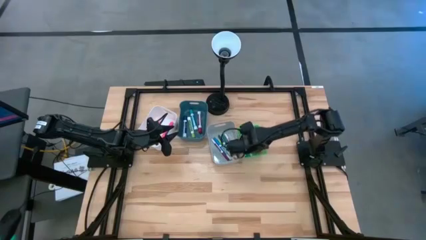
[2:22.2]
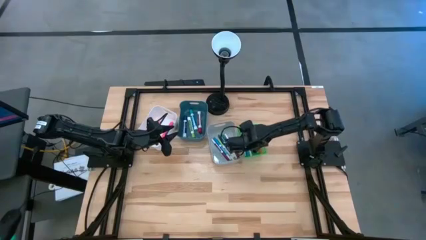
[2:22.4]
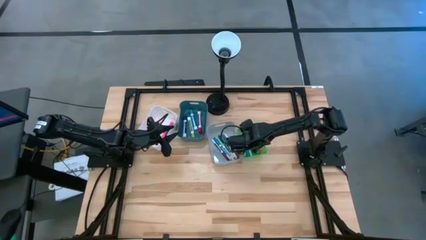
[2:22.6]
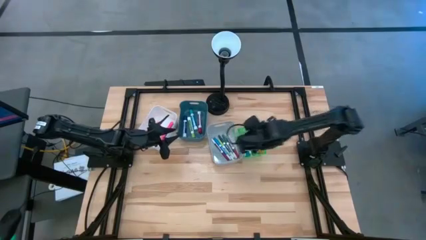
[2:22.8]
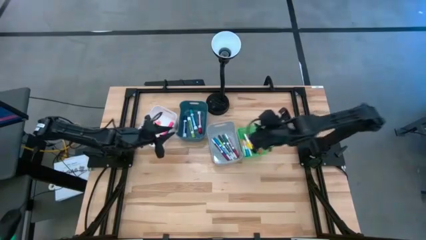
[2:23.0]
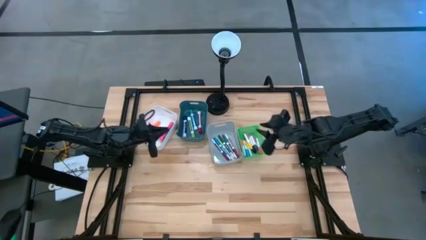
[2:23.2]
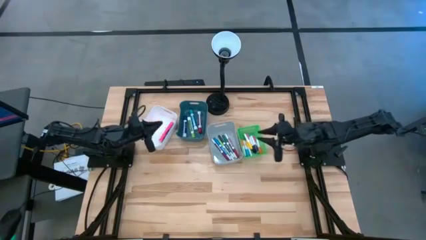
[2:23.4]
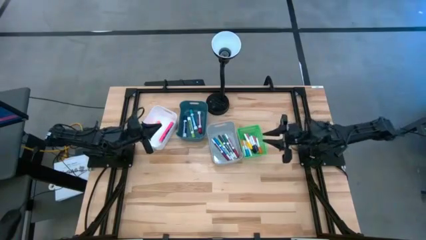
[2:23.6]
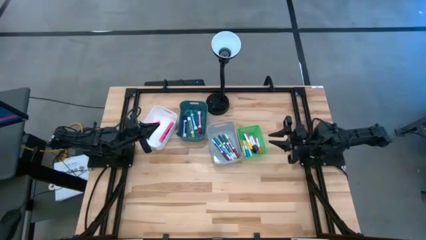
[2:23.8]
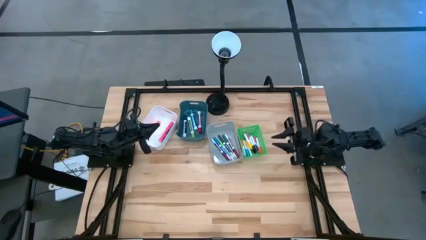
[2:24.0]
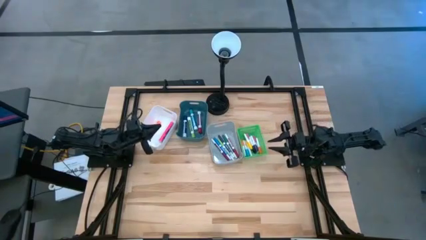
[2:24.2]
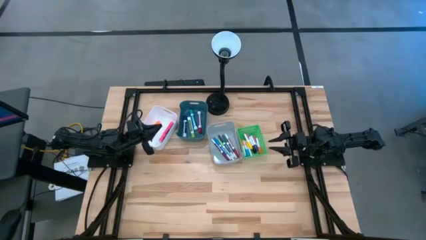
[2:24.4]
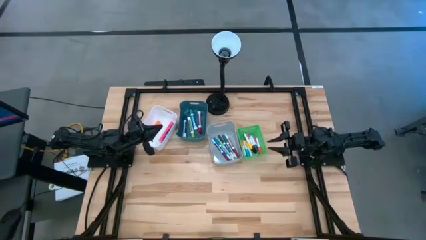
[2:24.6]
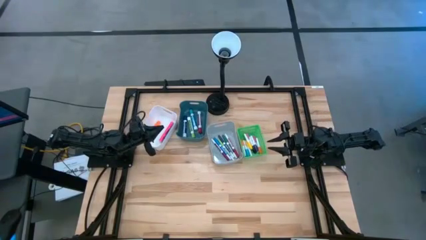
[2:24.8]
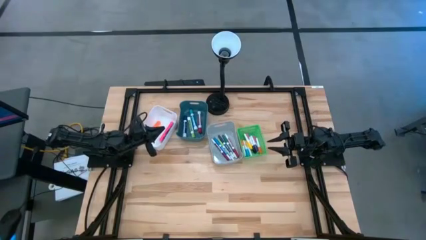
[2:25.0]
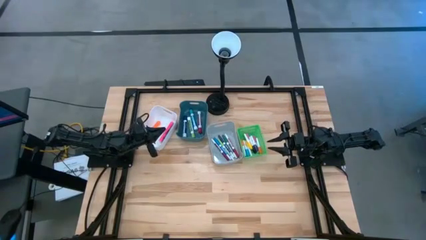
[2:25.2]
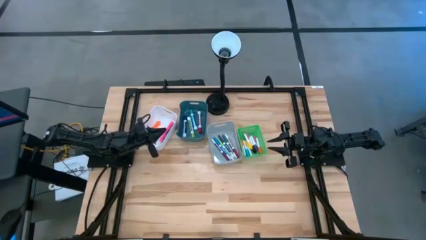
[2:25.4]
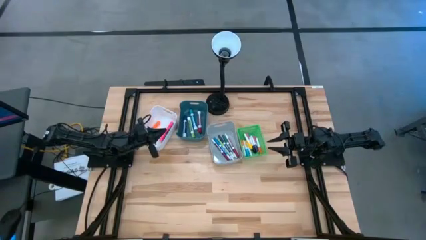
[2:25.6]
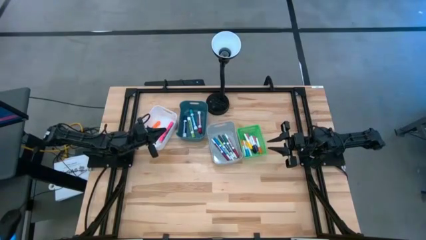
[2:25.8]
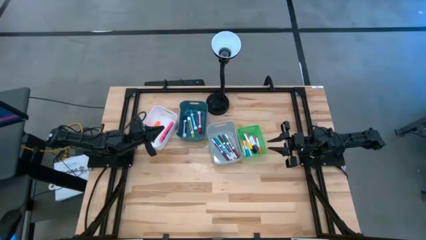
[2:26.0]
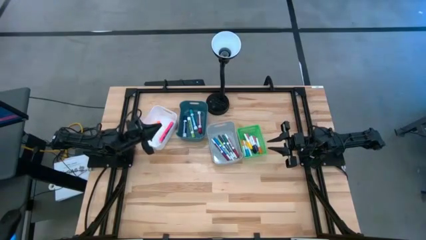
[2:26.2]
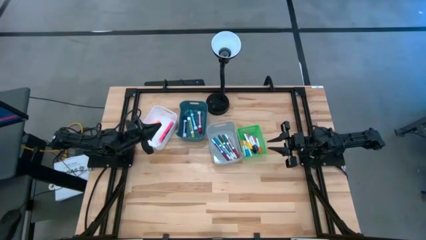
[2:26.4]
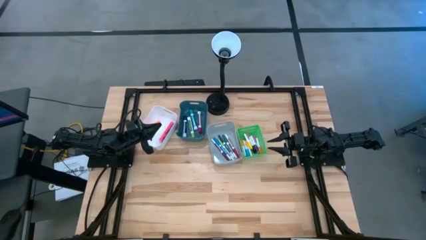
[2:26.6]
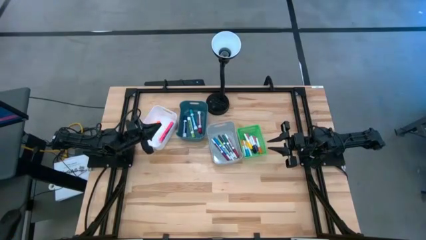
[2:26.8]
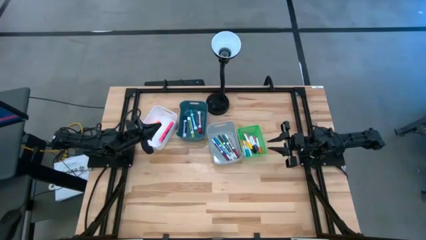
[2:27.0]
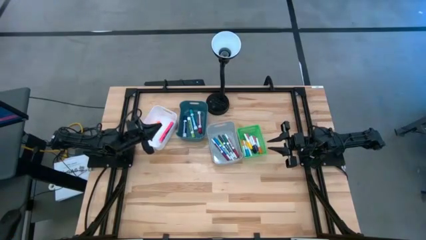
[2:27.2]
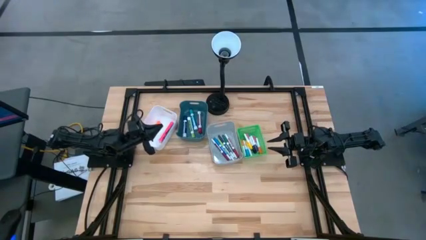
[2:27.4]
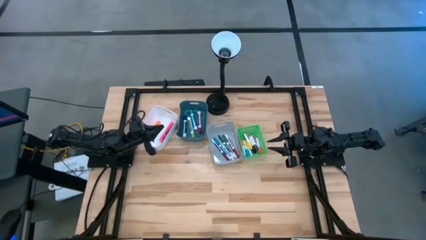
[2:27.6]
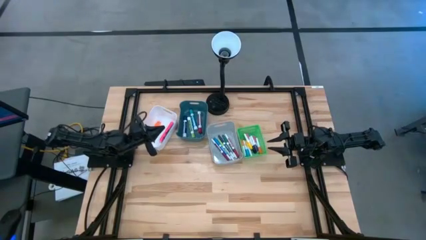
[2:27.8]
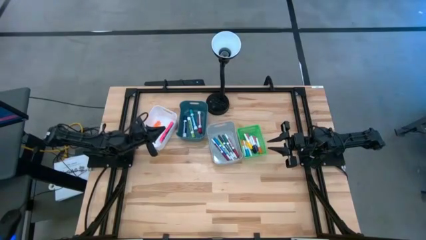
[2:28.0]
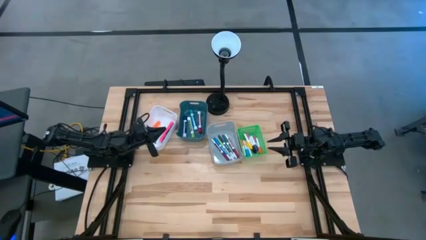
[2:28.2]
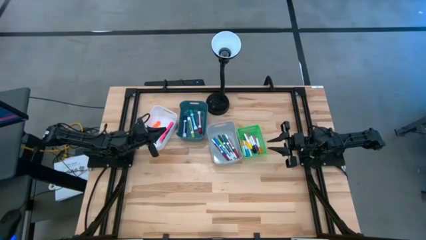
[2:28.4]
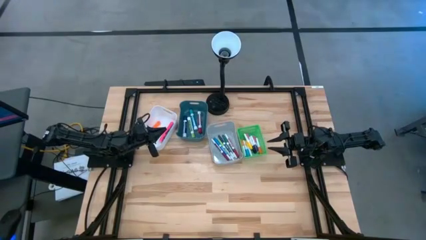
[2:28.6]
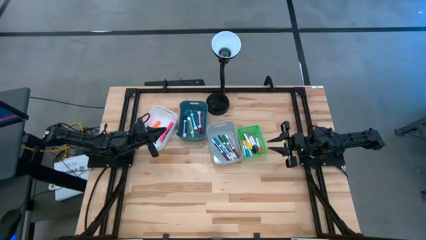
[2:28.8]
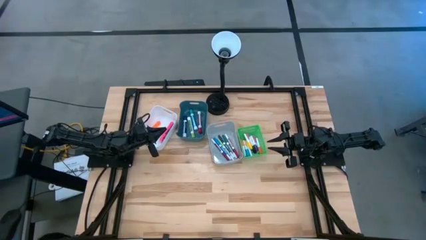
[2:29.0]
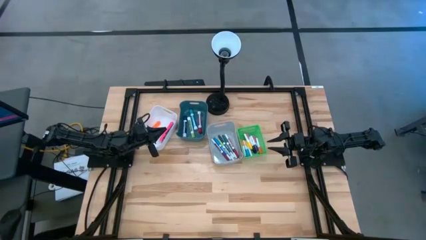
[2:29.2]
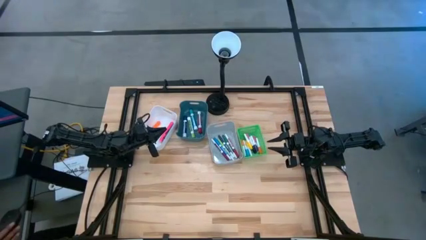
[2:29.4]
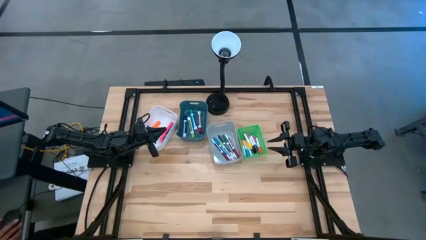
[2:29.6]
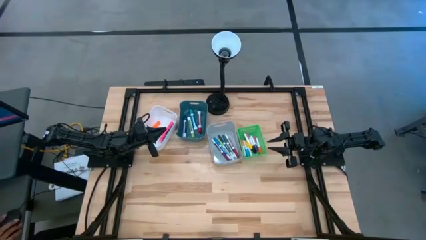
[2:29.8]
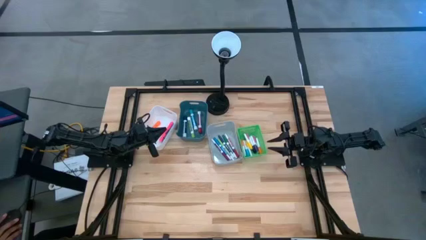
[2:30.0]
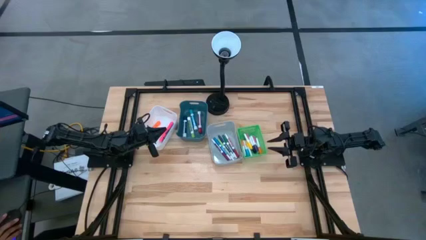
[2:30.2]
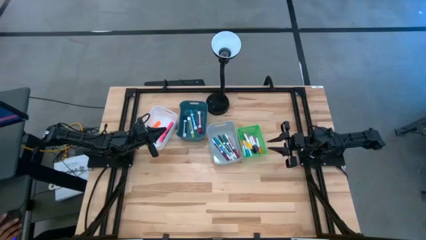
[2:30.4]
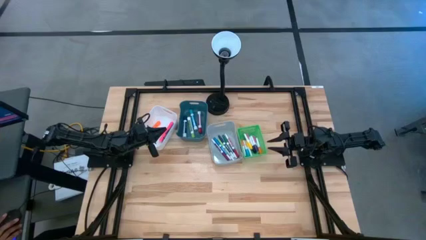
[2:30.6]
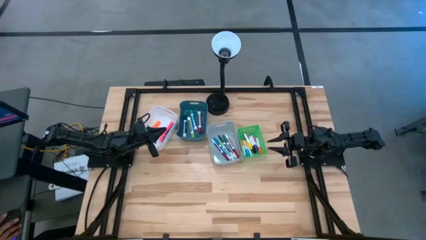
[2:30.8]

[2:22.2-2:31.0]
Task: Pick & Place Markers
Return to Home Position

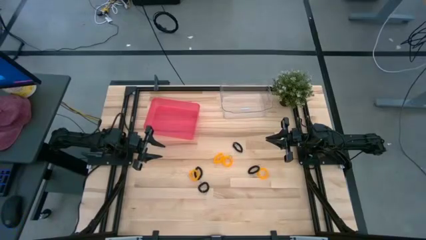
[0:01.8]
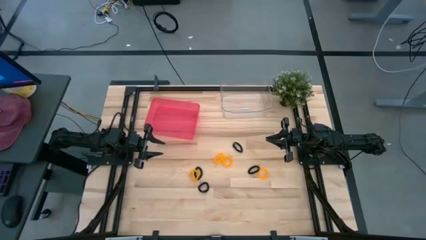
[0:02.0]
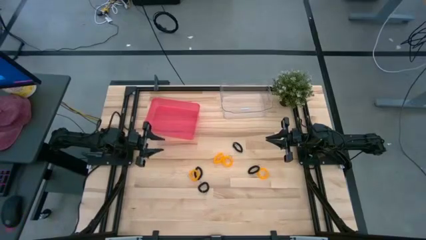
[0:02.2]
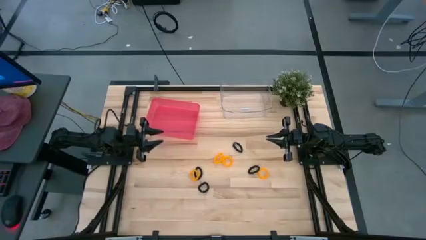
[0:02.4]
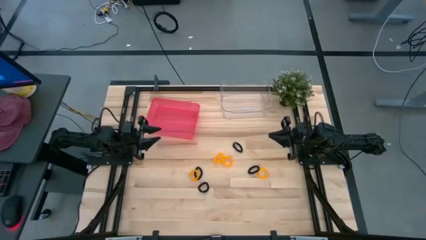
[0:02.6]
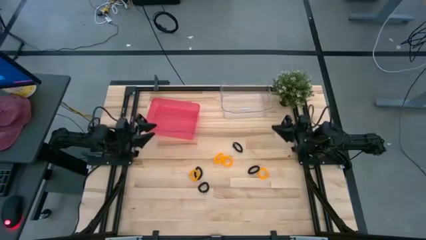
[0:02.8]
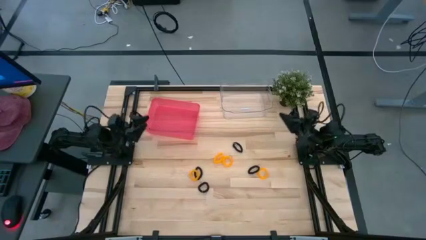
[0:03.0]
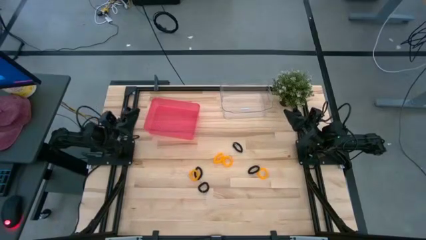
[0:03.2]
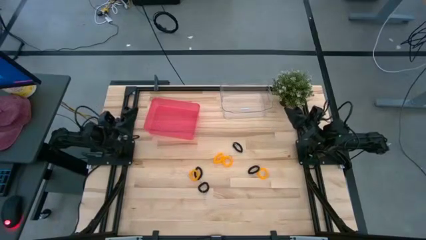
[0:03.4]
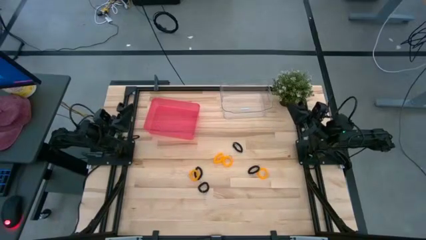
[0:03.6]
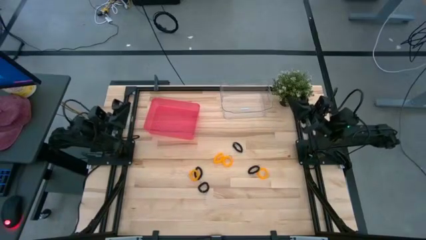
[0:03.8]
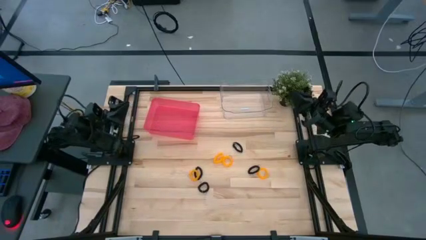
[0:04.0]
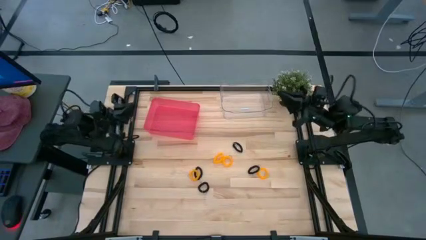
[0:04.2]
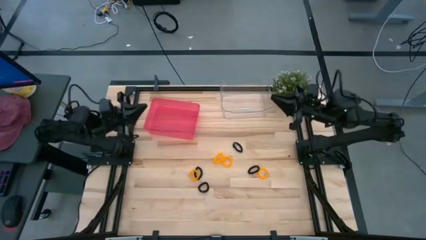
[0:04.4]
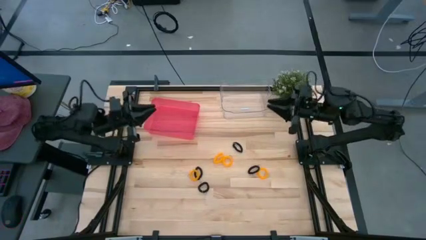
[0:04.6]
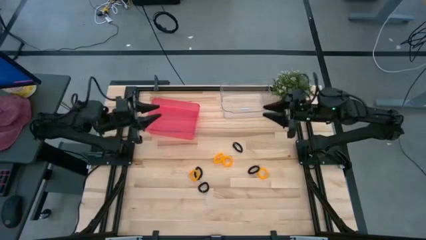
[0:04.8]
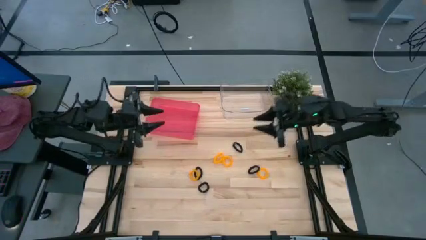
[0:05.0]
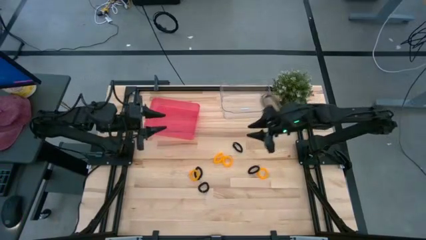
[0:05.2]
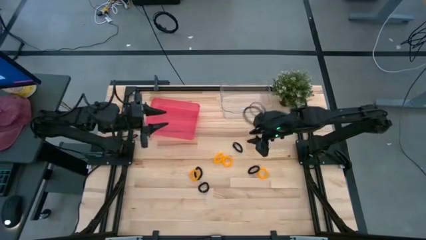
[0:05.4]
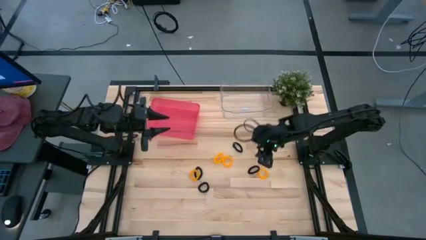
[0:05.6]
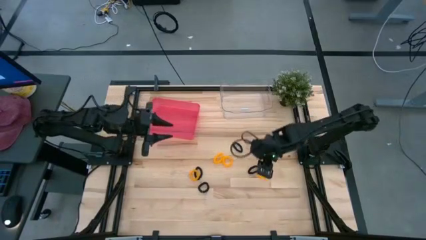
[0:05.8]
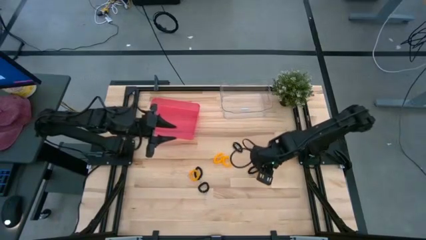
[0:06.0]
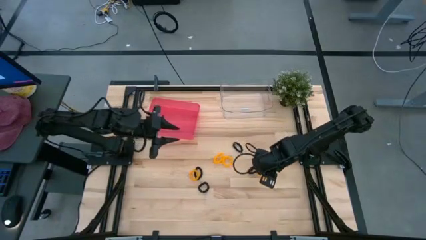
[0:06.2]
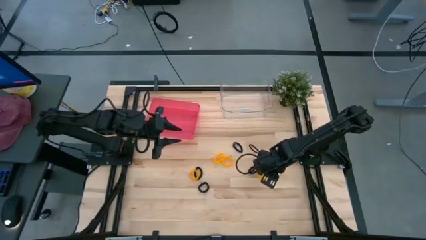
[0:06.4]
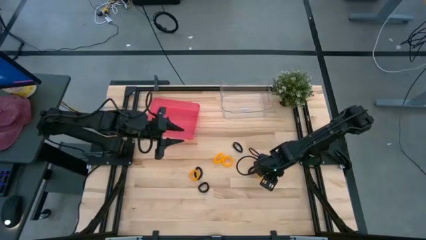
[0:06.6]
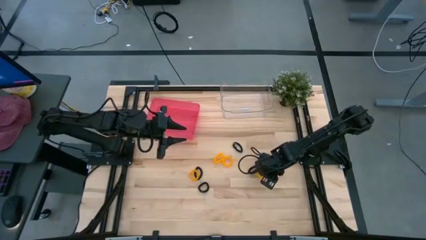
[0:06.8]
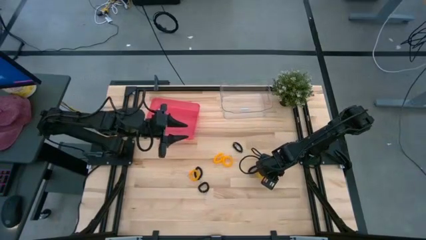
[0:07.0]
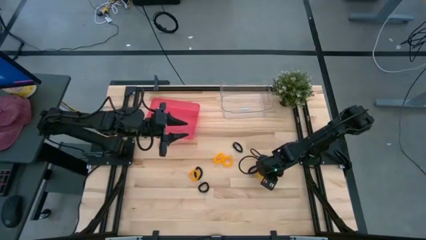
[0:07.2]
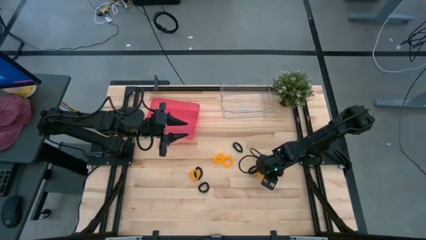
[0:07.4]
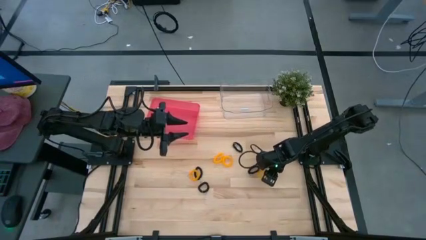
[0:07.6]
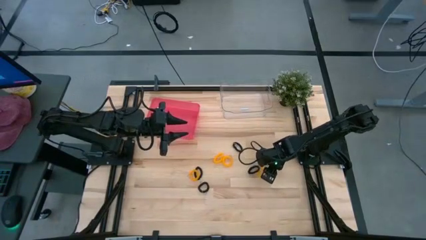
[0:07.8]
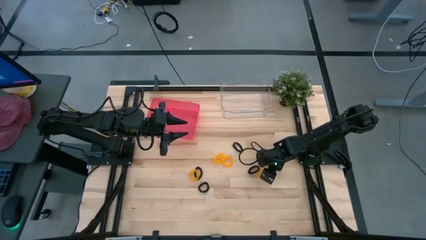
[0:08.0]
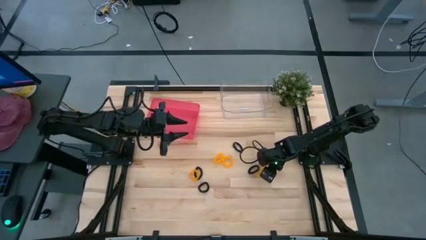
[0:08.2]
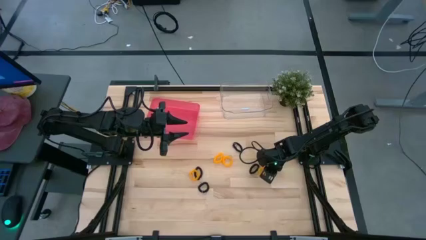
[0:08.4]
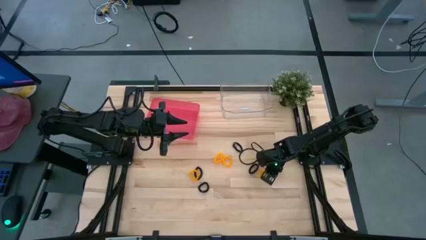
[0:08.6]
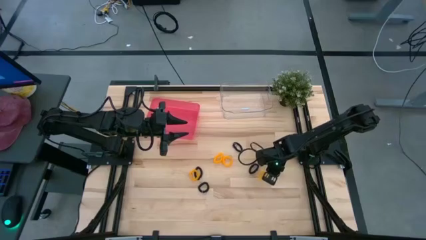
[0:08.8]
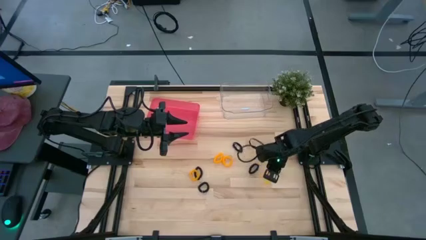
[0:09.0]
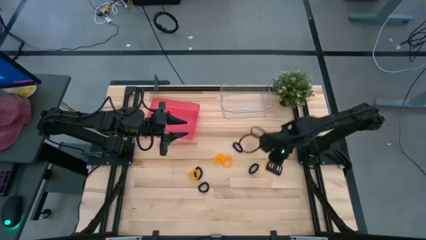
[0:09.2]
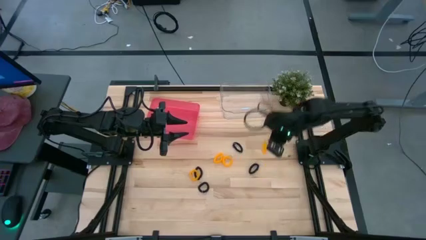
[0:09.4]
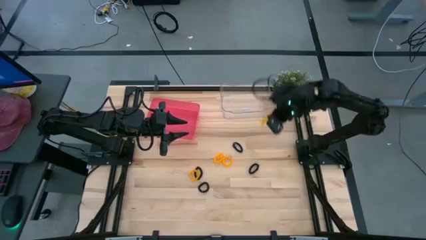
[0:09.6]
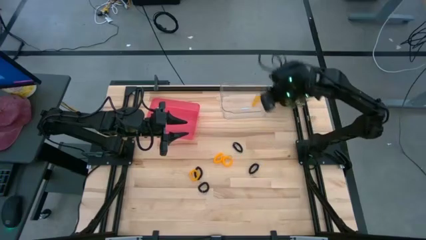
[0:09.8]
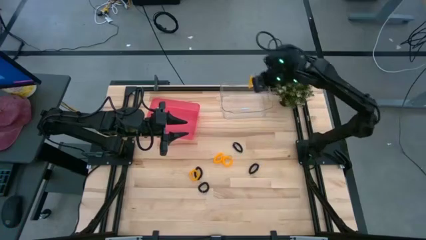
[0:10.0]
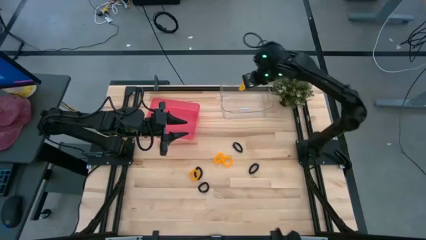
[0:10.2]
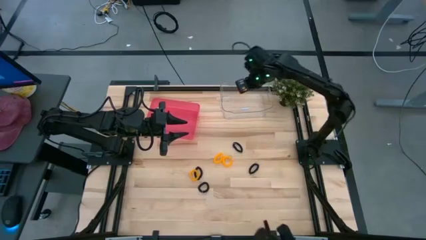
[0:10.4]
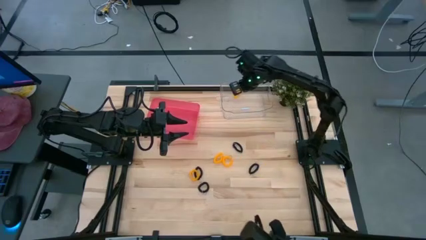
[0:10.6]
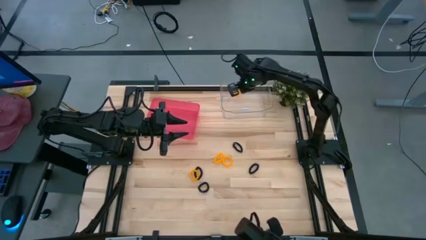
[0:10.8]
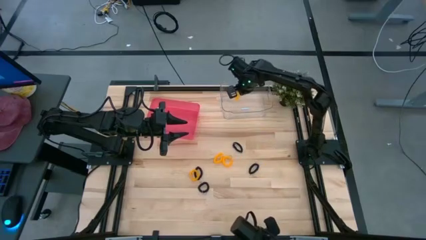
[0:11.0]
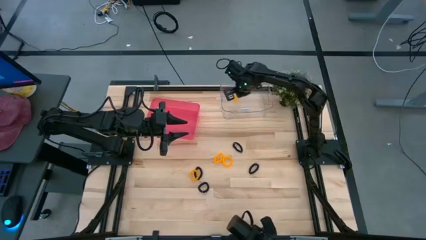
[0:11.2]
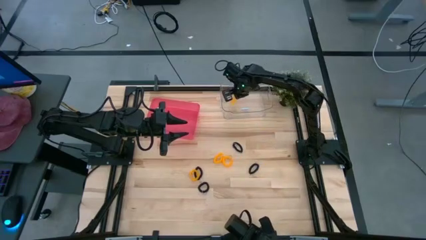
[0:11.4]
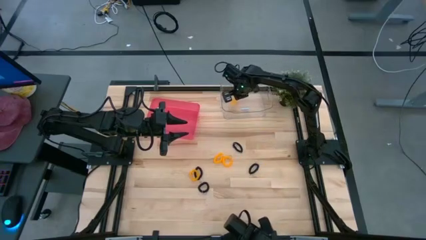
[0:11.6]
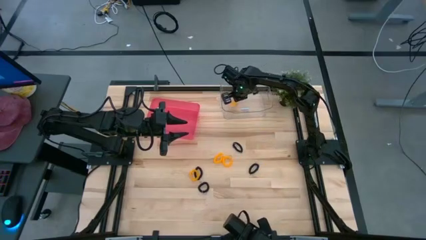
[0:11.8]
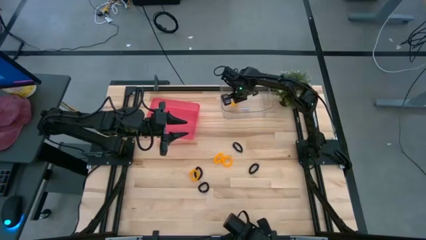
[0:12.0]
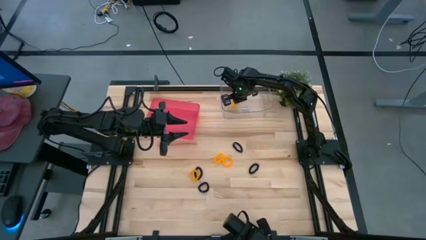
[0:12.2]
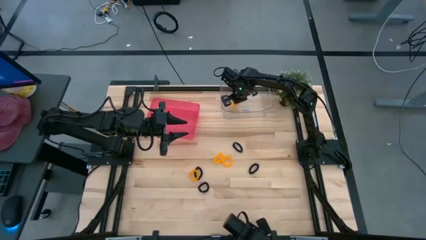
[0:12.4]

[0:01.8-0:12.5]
Task: Sort spring keychains
Put the yellow spring keychain into the transparent bin
